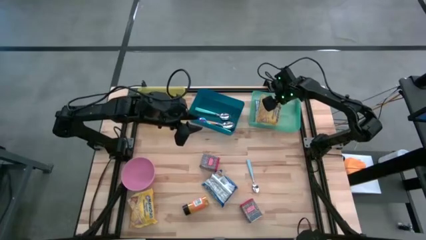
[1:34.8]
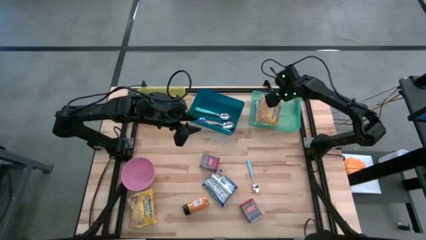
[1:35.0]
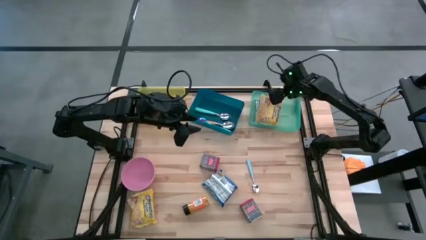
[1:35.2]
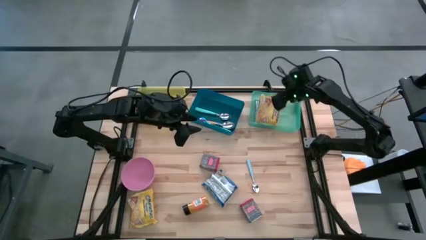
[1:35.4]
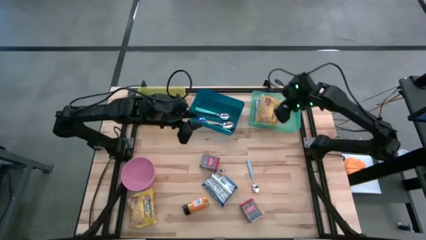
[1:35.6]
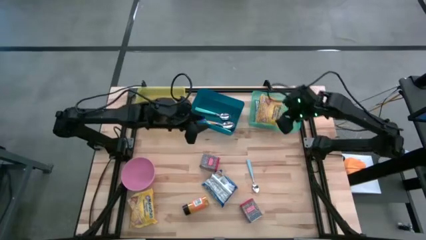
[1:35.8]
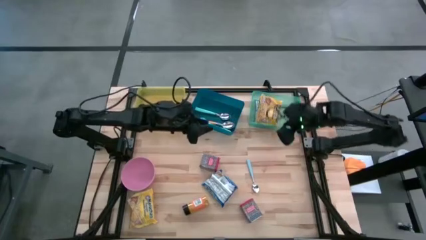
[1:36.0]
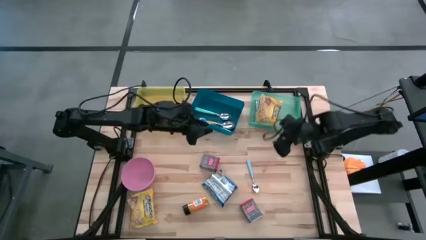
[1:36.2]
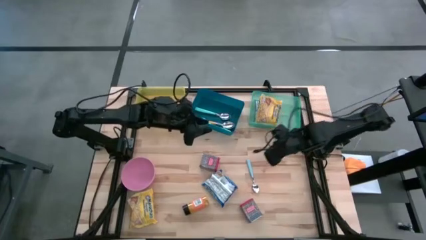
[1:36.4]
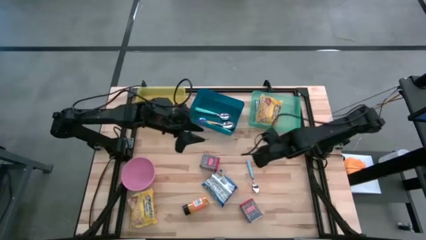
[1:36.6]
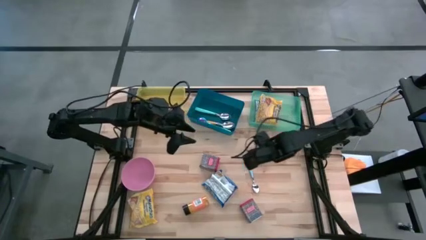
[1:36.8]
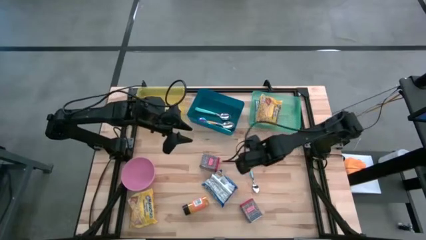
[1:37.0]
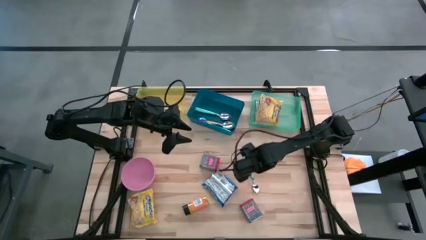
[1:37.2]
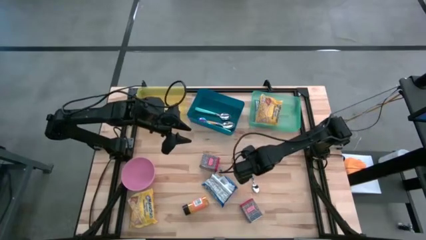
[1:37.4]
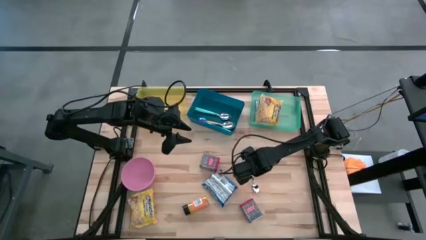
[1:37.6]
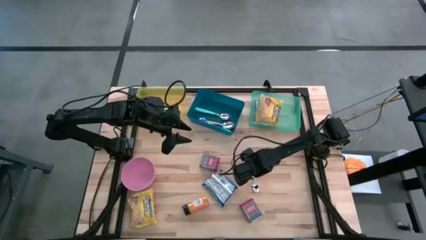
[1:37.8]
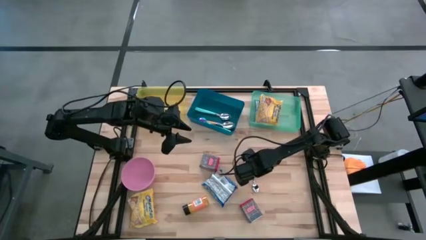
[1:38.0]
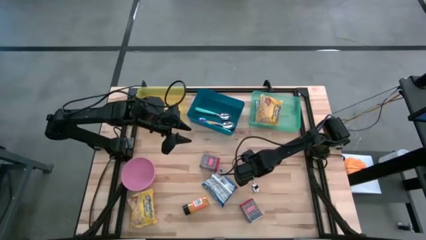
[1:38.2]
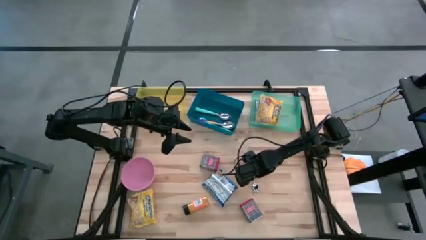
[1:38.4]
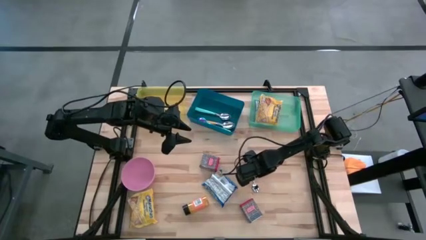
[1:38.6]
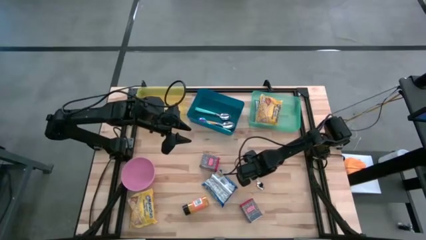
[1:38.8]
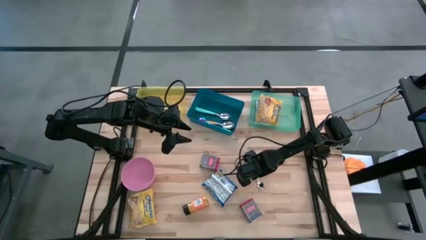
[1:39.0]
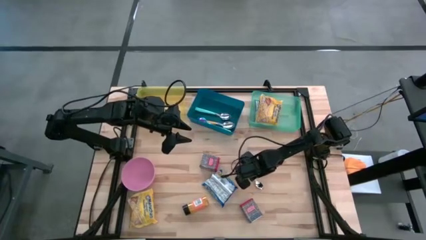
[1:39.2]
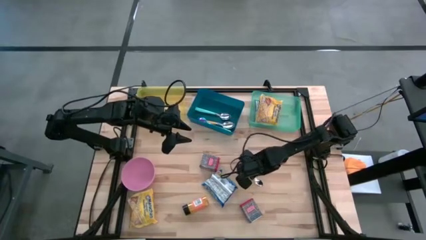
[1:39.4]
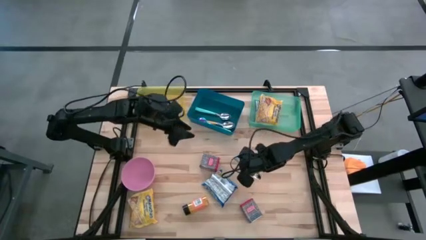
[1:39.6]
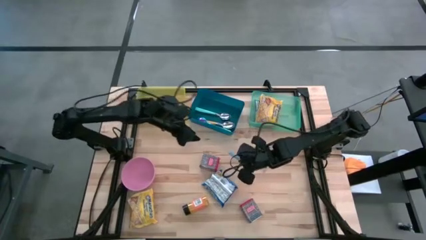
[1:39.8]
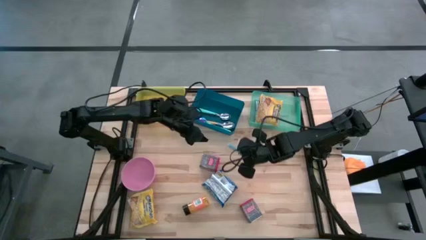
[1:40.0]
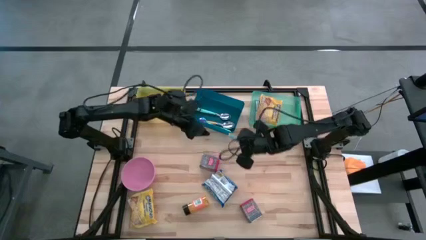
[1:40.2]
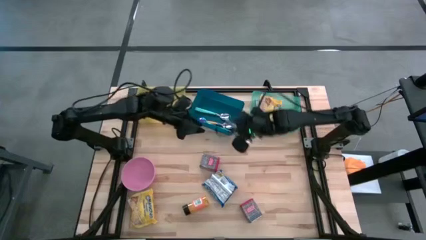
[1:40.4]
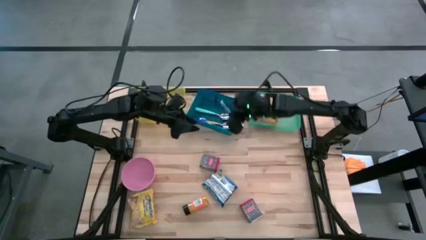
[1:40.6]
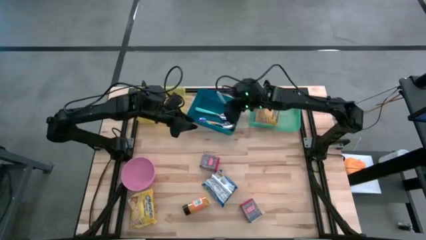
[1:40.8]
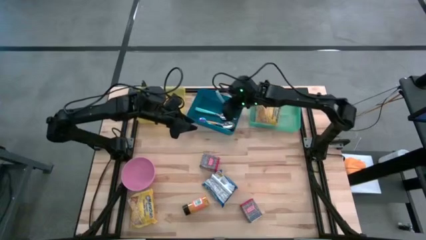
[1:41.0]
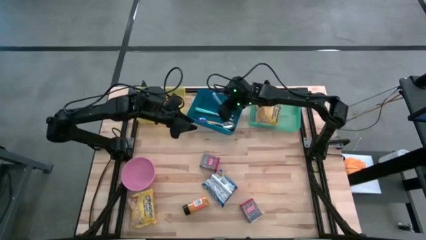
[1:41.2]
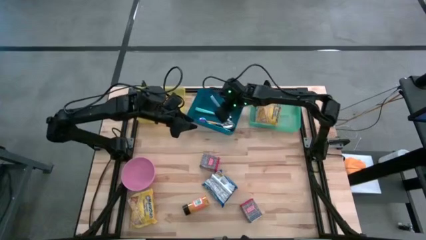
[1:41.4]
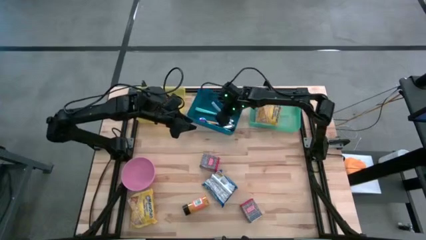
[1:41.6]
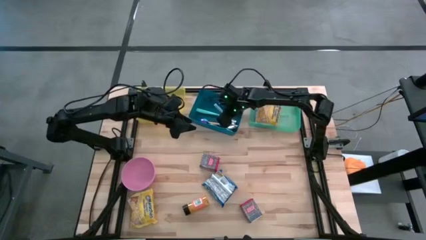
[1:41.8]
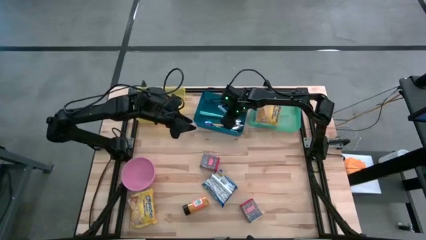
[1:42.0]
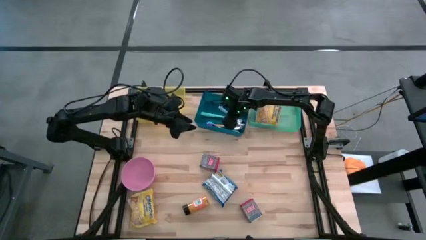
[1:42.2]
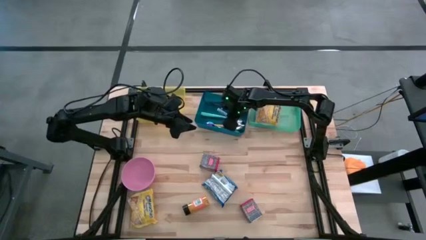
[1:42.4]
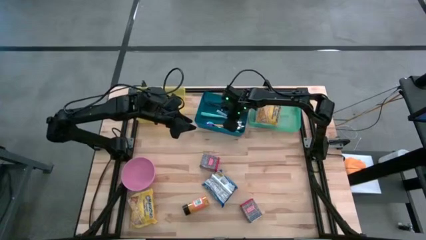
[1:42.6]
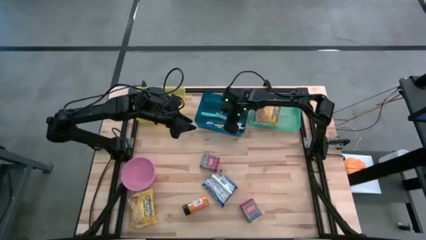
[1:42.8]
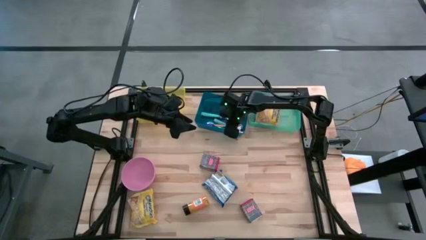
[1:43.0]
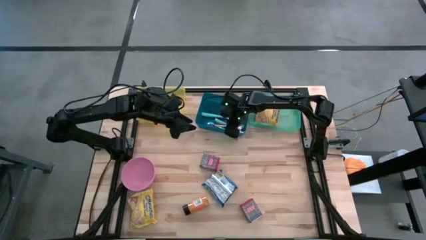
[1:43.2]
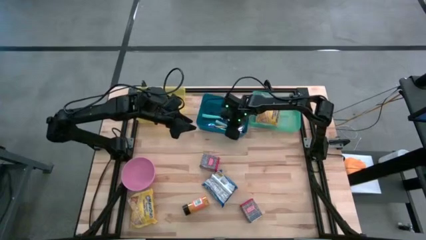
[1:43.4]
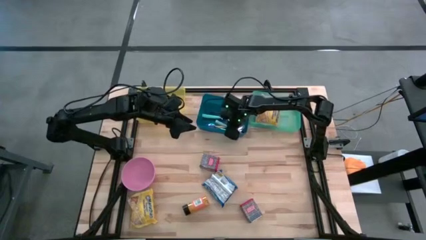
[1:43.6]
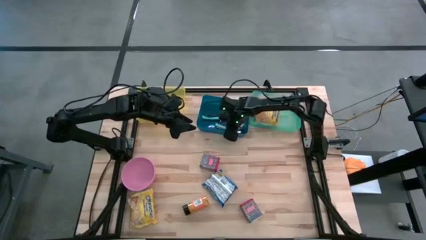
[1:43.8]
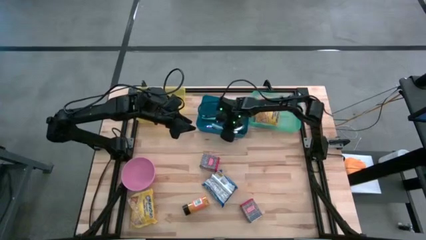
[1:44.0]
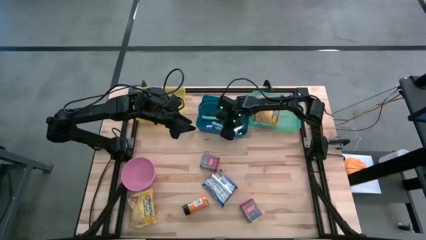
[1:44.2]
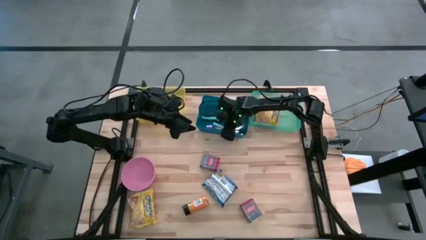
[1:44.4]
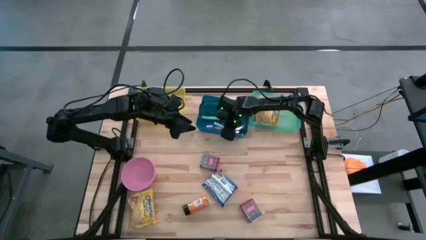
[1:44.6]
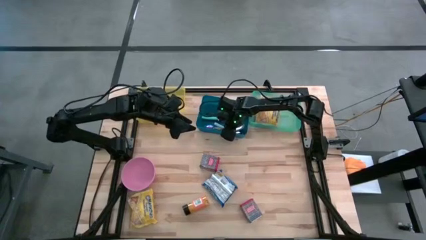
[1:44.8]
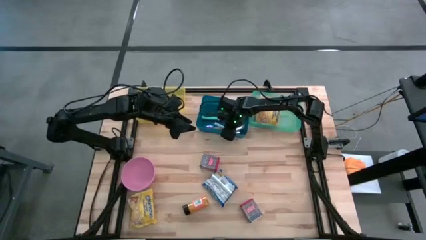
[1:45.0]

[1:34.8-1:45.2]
Put the light blue spoon into the blue bin

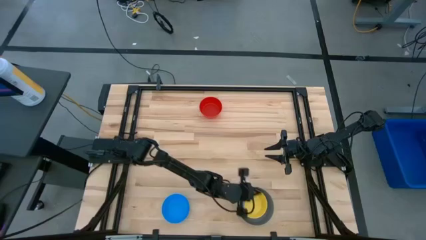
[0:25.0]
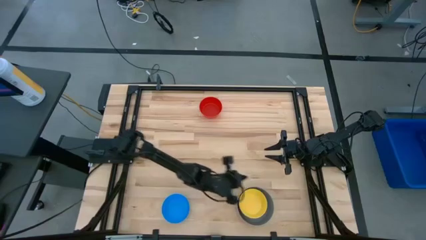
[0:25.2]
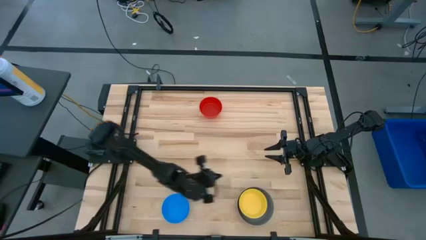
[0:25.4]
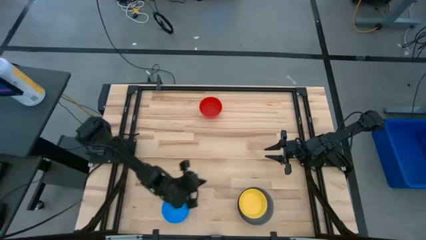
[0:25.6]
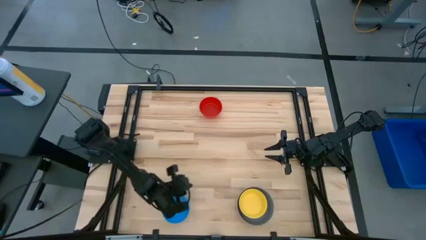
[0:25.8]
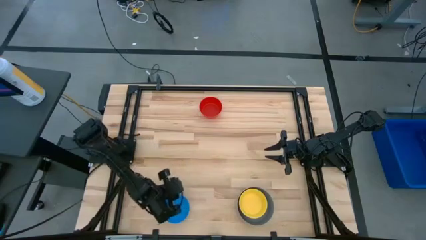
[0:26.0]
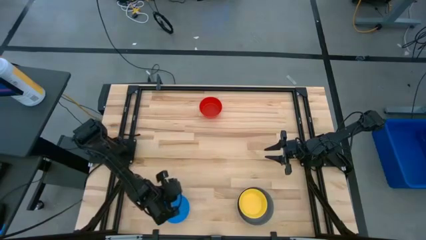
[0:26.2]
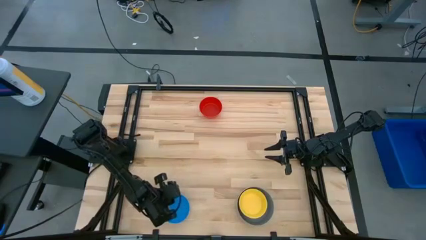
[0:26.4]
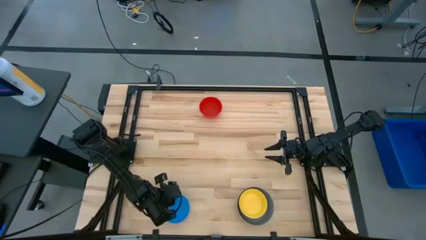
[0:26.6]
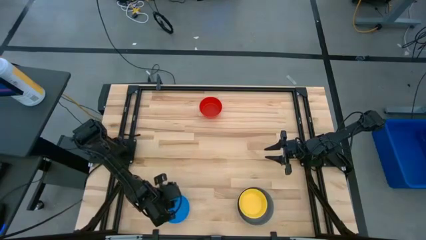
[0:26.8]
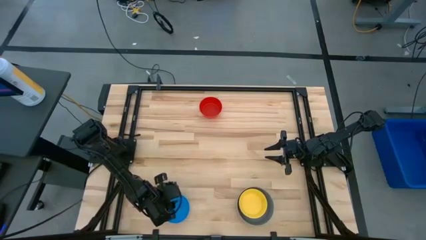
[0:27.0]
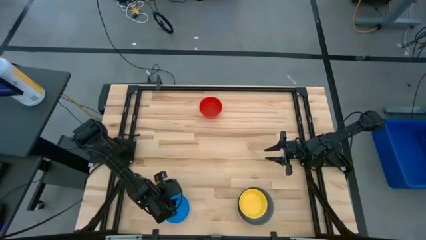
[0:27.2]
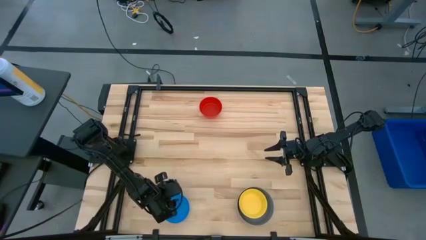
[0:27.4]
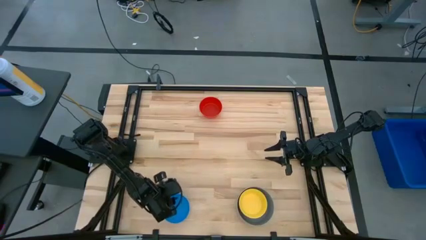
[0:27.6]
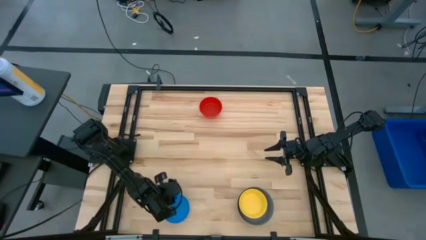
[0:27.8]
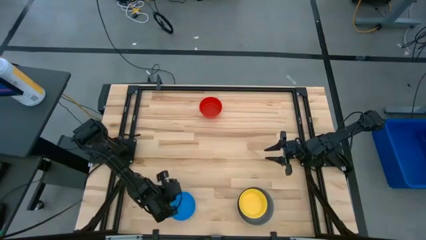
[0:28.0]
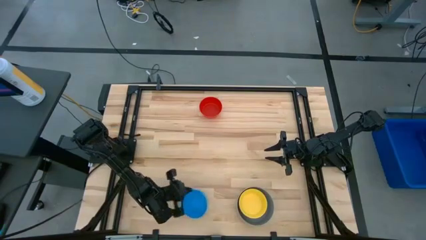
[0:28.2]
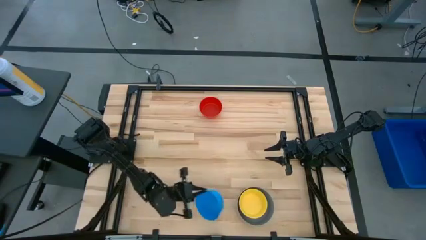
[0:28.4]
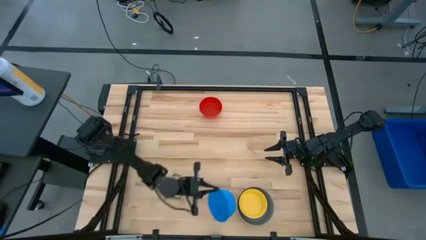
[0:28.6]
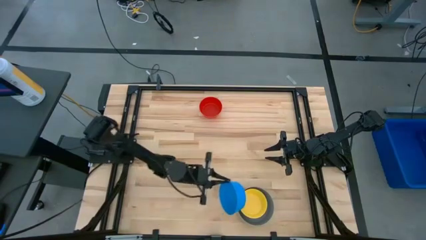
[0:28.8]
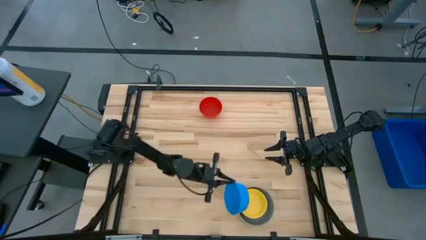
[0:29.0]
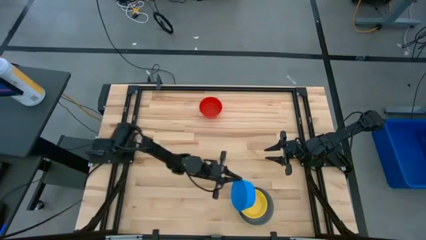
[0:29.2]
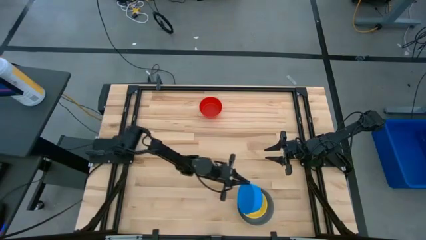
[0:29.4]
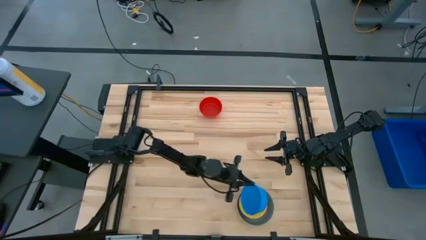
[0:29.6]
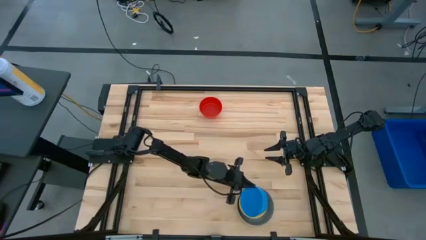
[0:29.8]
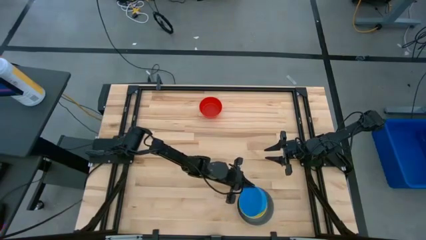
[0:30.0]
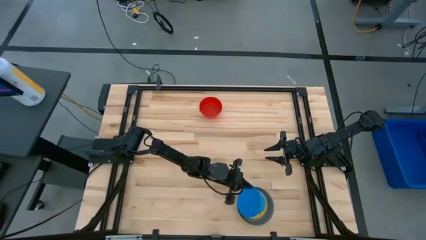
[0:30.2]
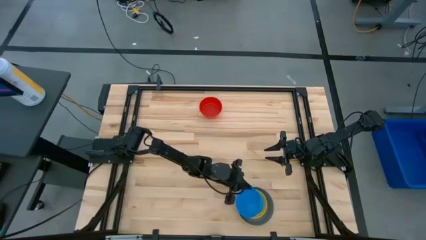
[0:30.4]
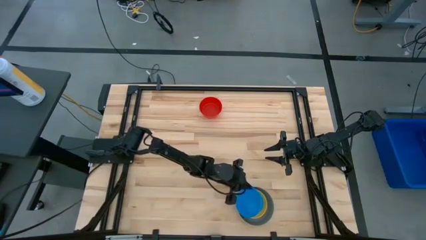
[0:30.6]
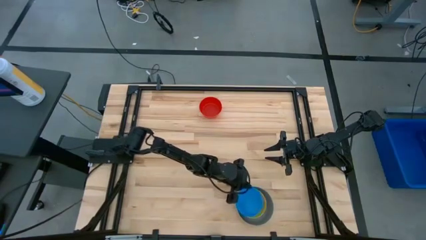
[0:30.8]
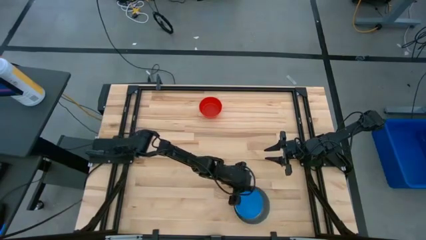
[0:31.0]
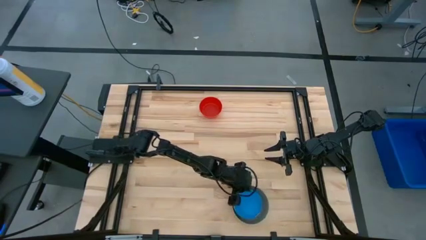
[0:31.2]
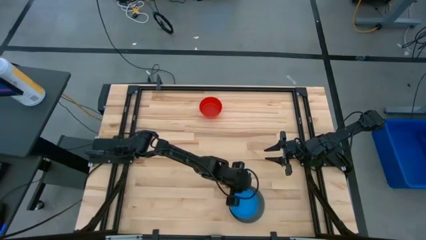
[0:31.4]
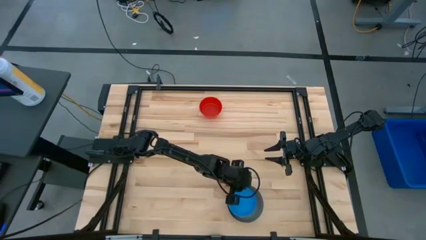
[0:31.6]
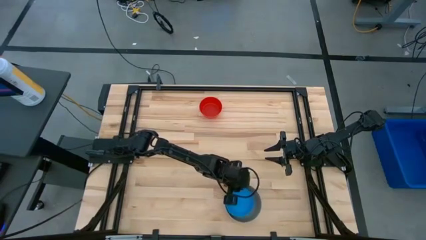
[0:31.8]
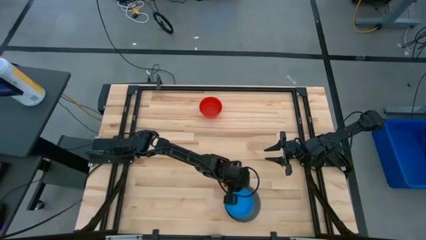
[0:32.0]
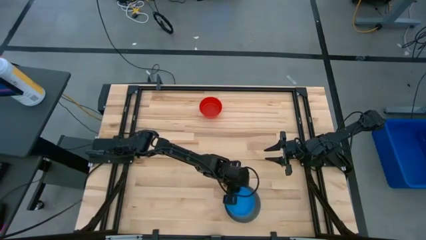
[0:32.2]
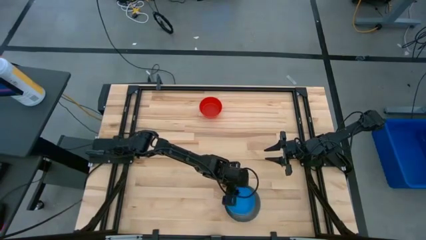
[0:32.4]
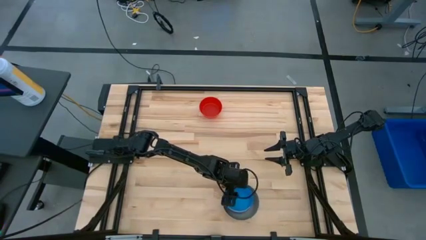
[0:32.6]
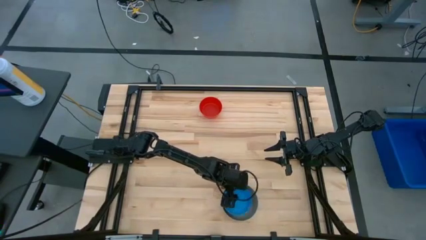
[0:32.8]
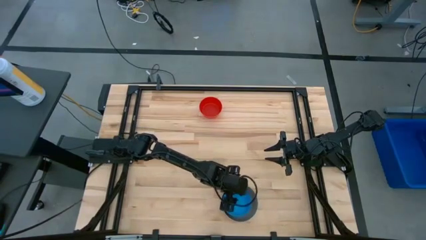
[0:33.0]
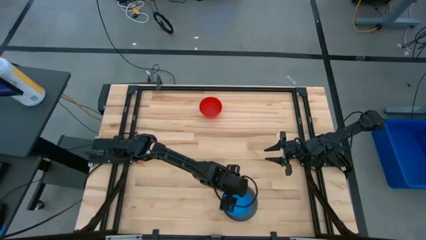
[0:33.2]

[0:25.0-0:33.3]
Stack the light blue bowl on the yellow bowl
